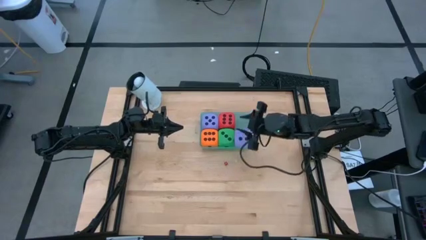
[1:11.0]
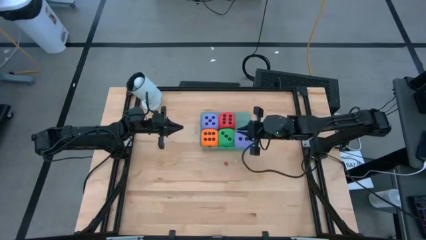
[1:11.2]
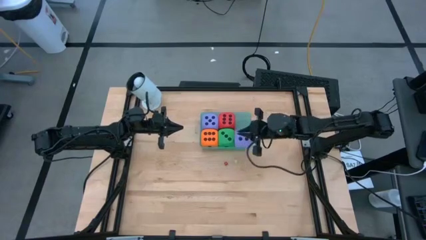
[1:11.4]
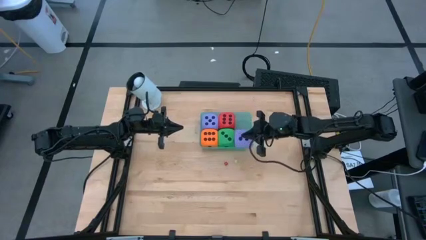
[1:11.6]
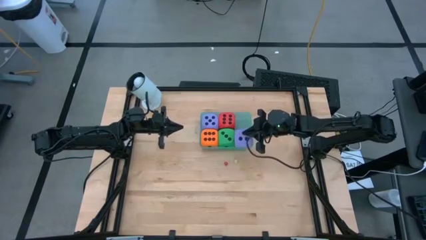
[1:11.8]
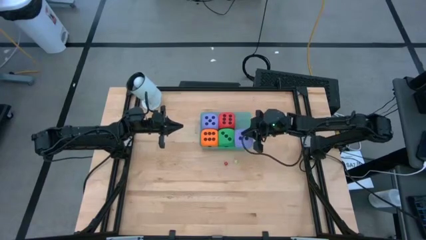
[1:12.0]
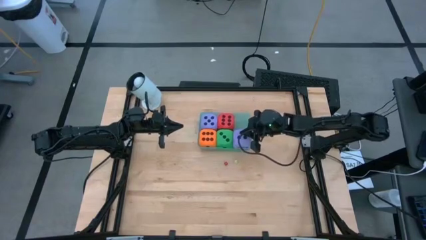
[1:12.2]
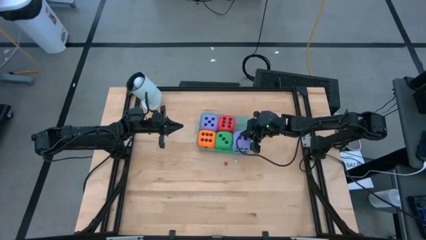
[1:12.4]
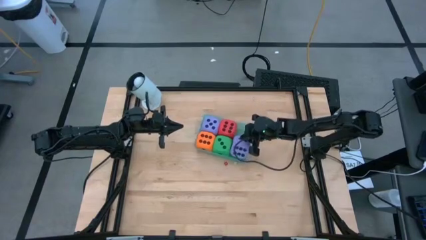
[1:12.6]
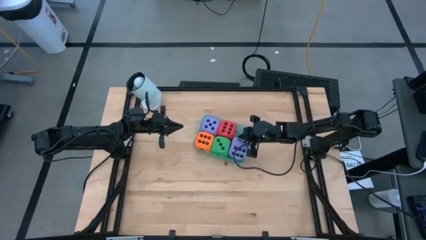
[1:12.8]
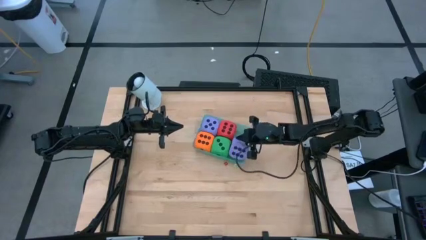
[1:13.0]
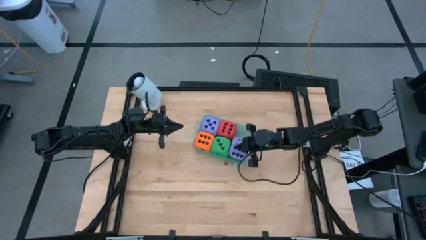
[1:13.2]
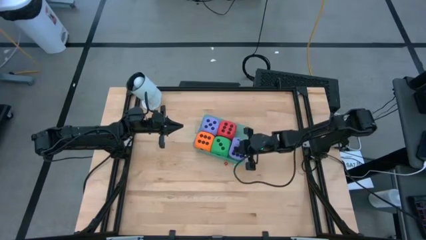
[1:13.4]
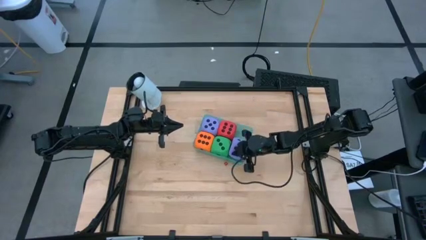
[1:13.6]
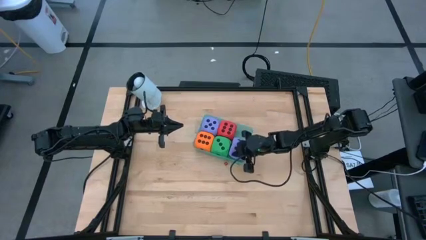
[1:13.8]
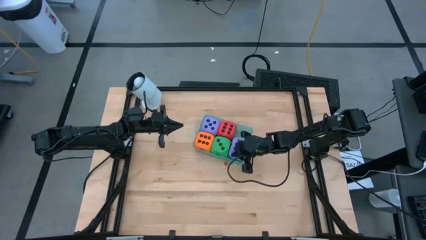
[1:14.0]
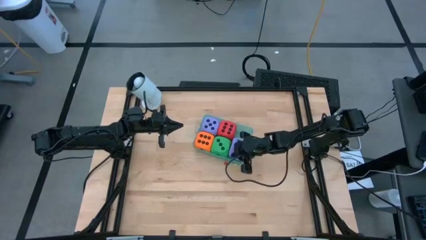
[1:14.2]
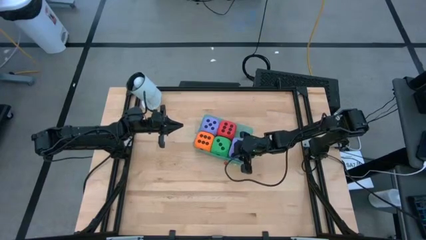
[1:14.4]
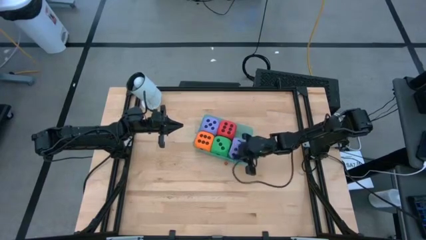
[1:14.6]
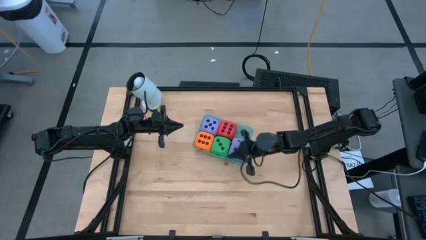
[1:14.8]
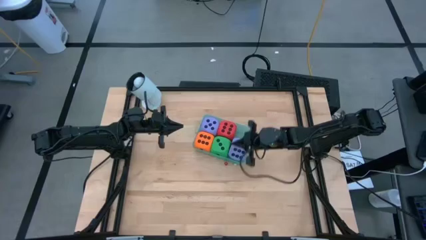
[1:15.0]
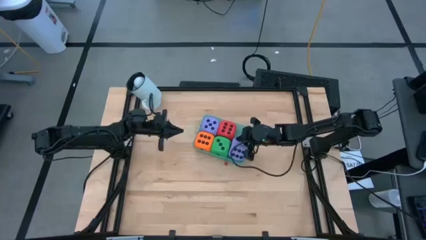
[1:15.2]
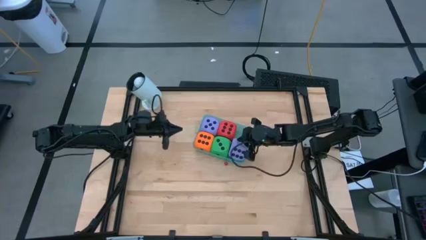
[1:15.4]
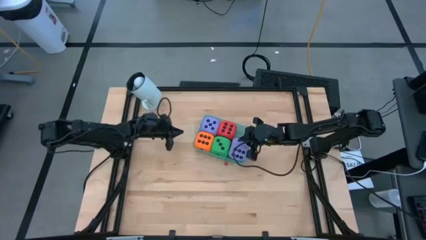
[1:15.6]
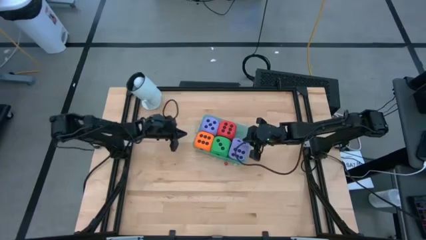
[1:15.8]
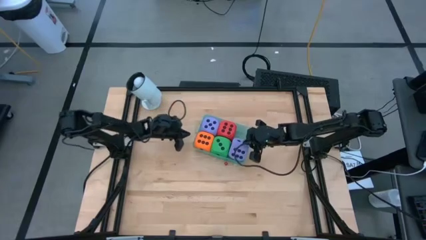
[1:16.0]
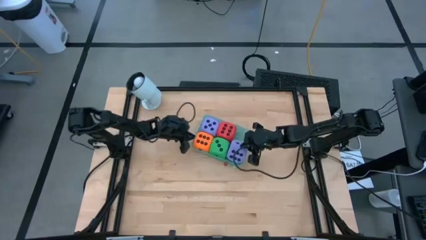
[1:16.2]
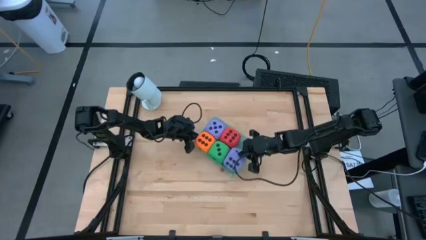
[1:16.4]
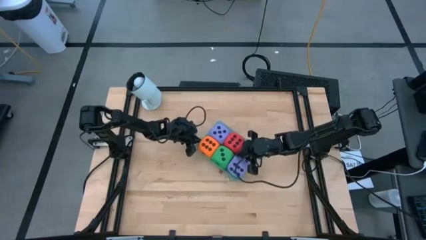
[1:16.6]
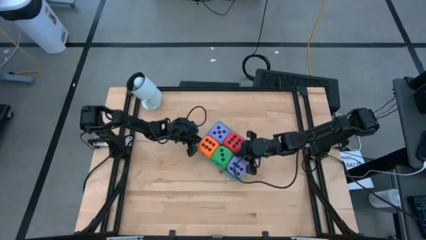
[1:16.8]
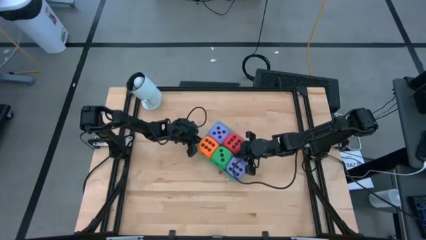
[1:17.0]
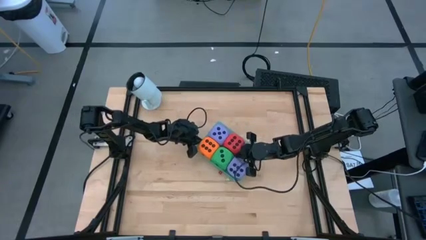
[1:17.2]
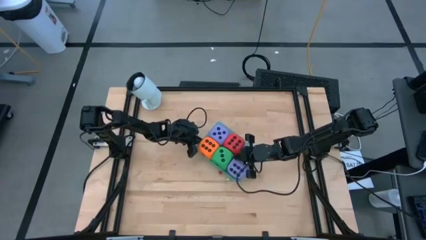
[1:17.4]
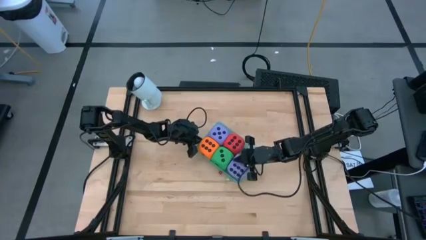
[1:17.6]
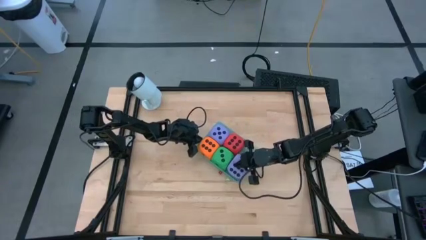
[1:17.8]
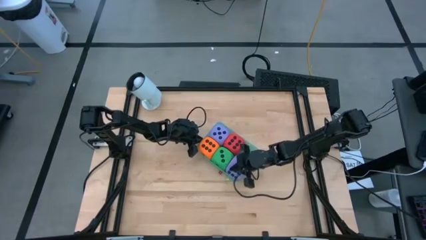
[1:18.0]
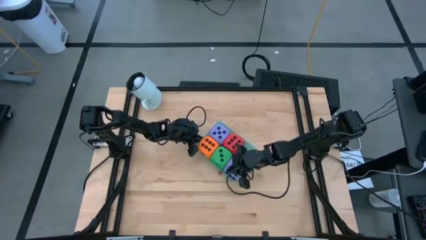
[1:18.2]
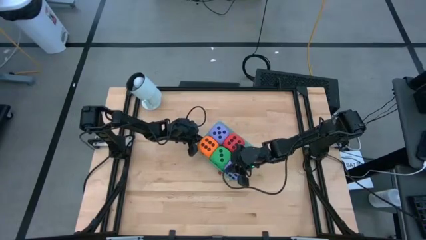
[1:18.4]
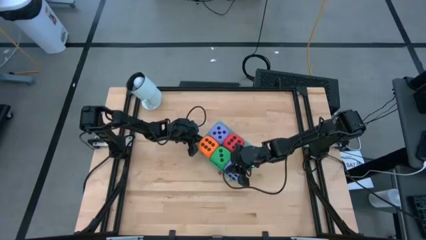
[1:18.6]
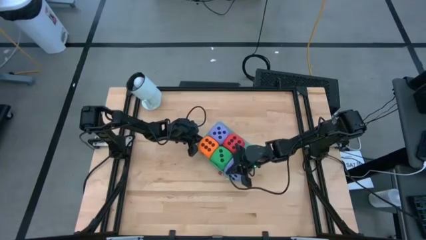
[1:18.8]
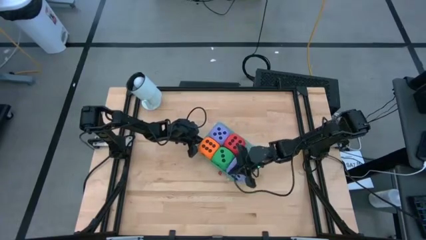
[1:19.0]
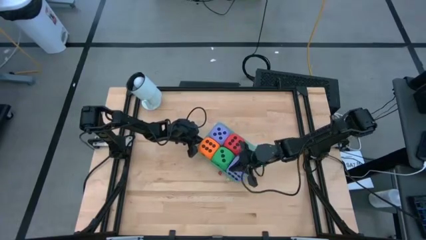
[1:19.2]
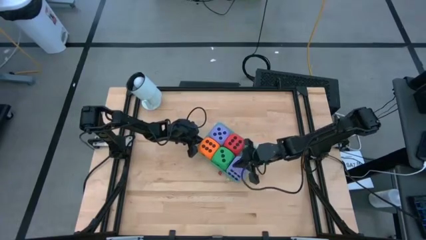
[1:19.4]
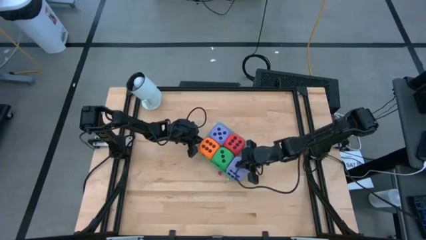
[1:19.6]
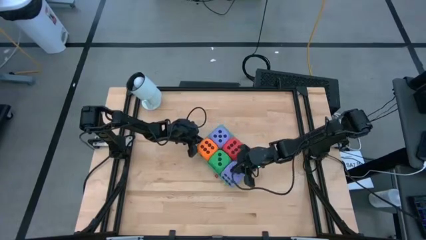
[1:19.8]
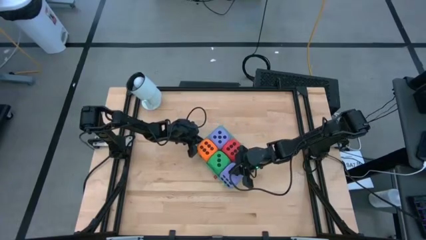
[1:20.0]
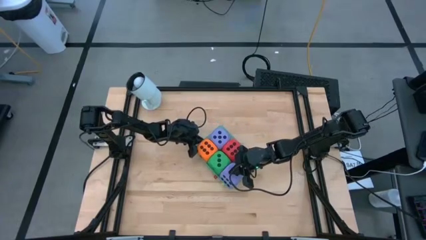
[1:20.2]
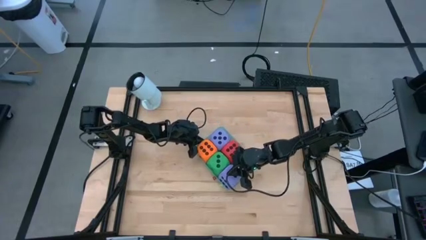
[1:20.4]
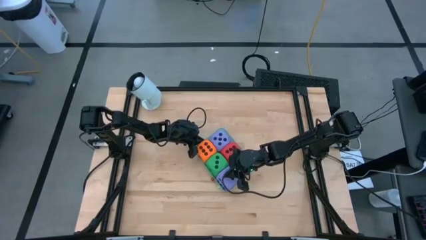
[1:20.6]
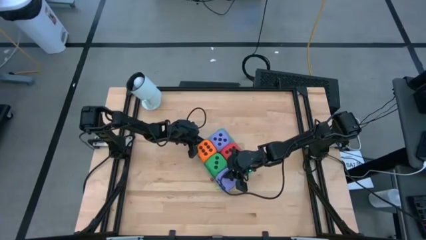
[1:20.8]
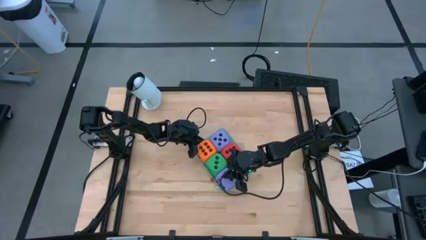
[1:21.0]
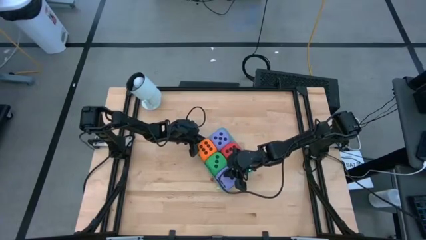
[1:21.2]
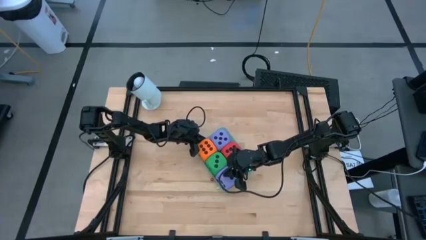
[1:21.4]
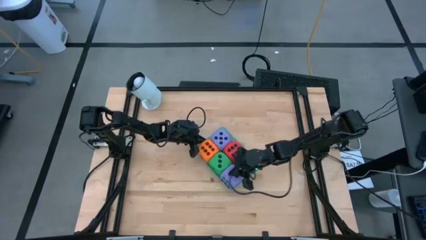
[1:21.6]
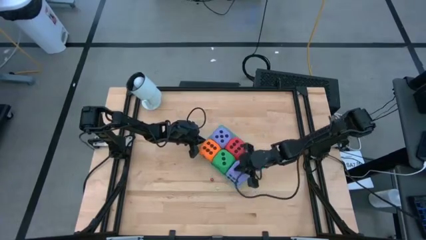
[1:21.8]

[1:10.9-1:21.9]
Task: Pick & Place Dice
Put the big purple die into the green bin

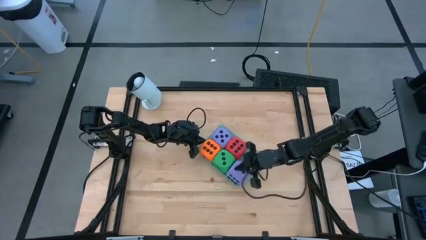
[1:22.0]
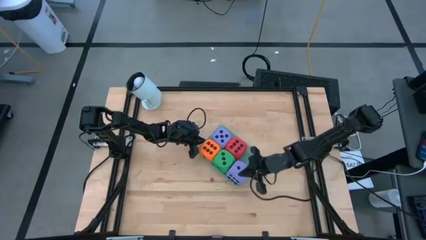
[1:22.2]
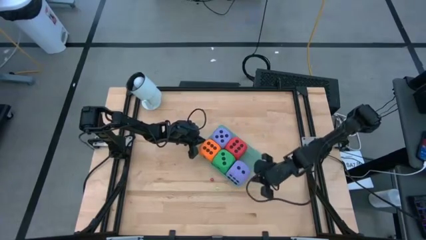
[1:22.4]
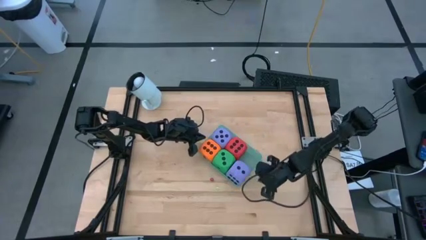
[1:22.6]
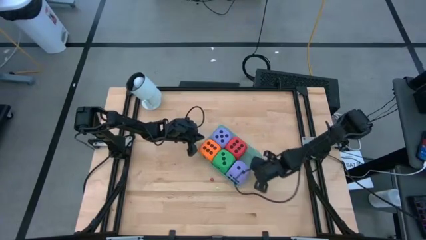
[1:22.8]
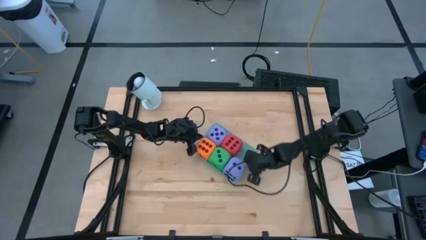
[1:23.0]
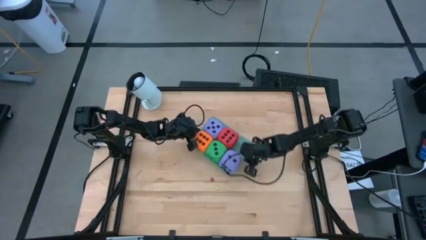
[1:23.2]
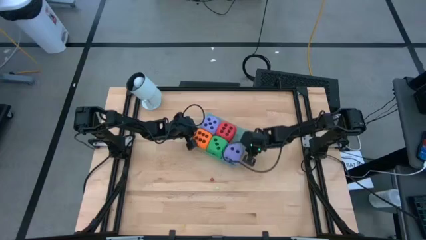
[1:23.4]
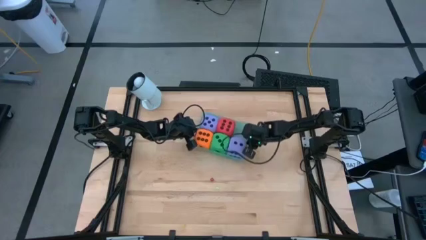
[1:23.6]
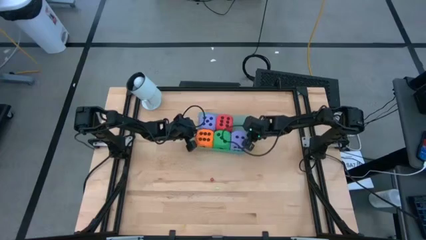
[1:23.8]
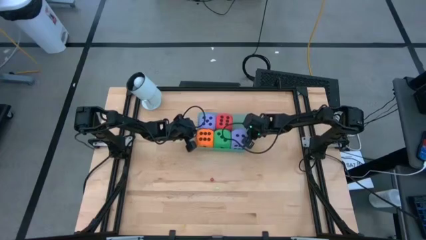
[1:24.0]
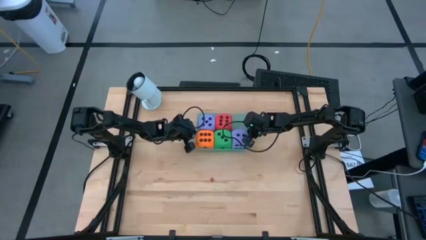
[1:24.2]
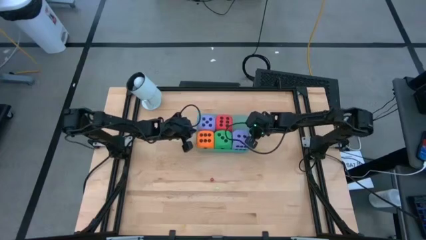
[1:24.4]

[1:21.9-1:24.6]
Adjust the green bin

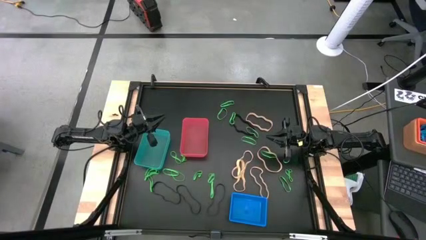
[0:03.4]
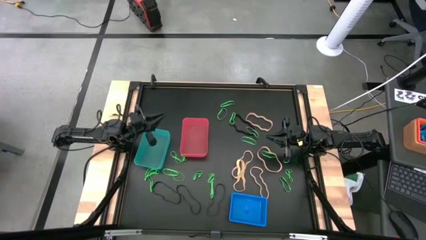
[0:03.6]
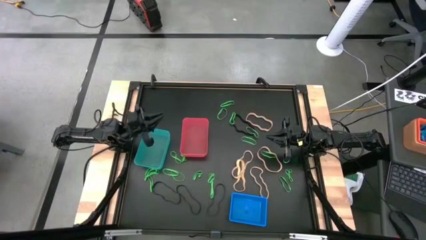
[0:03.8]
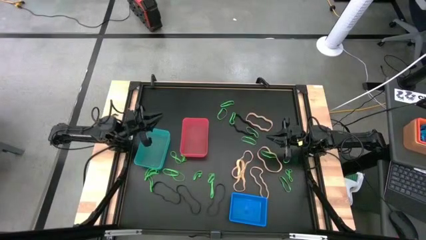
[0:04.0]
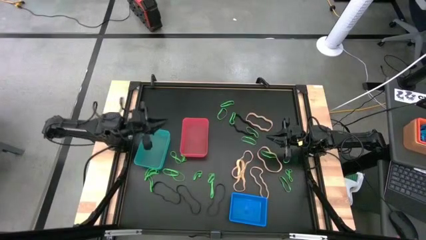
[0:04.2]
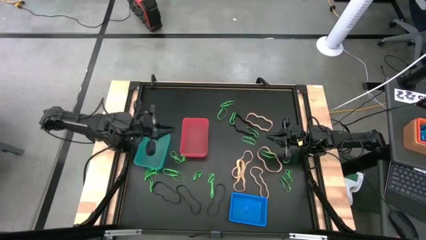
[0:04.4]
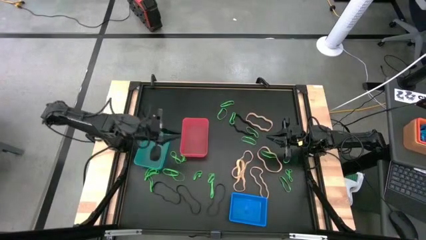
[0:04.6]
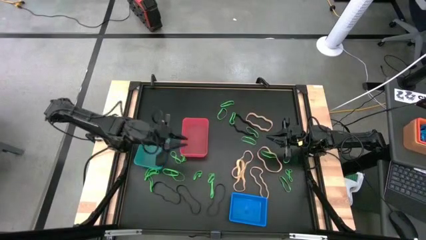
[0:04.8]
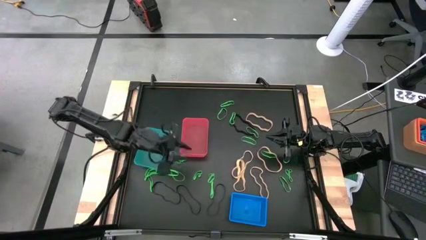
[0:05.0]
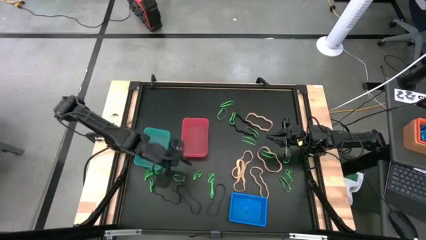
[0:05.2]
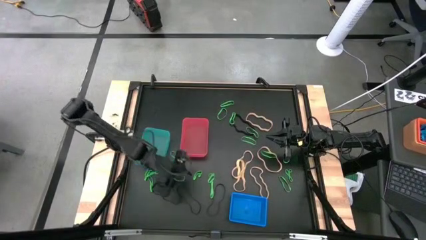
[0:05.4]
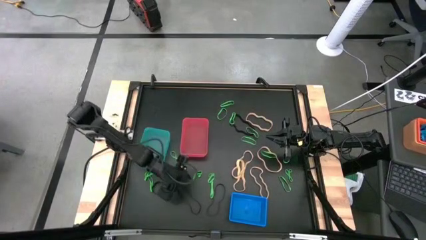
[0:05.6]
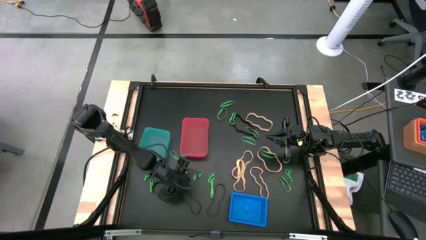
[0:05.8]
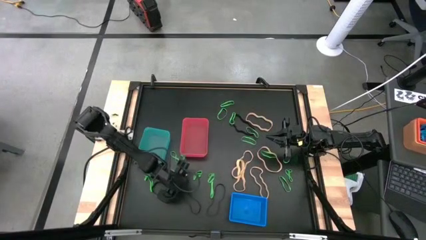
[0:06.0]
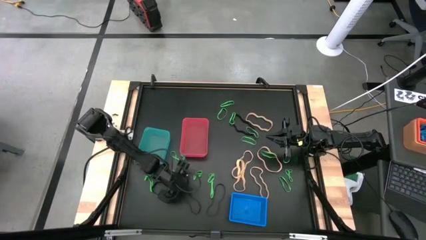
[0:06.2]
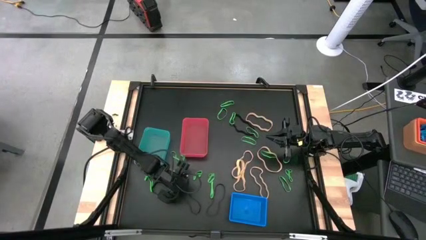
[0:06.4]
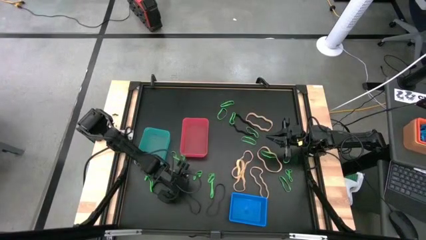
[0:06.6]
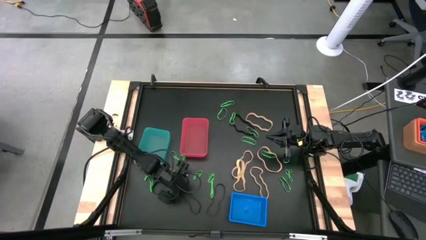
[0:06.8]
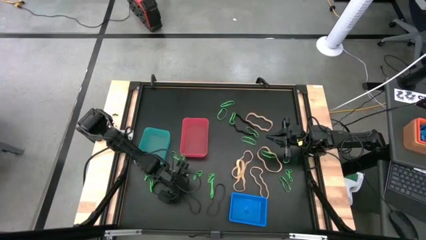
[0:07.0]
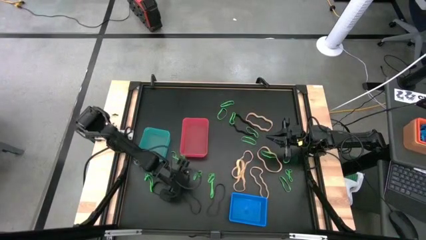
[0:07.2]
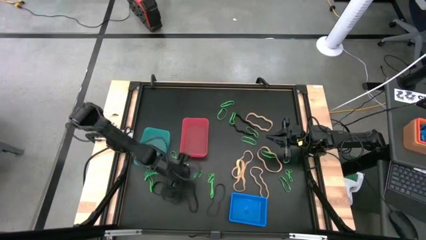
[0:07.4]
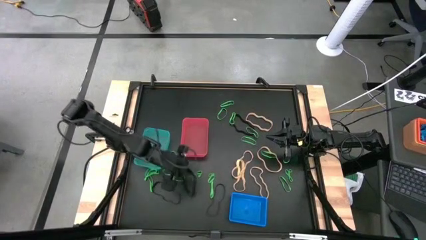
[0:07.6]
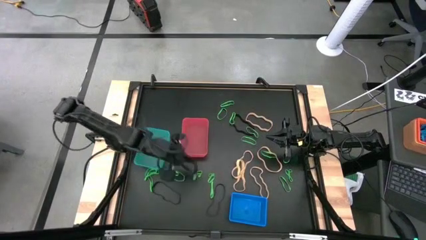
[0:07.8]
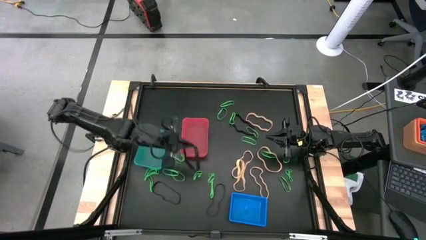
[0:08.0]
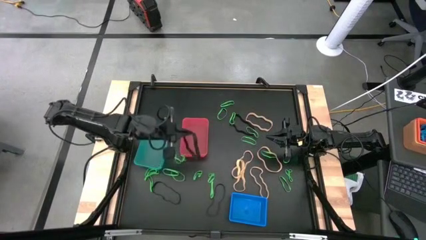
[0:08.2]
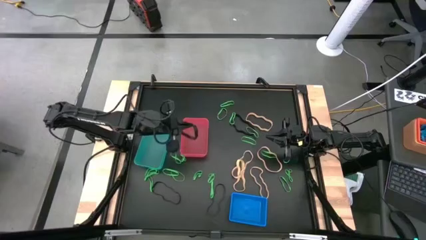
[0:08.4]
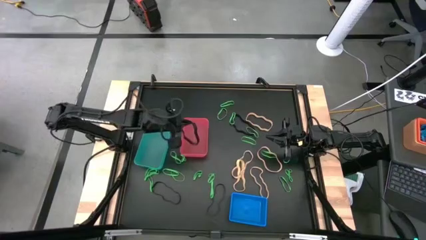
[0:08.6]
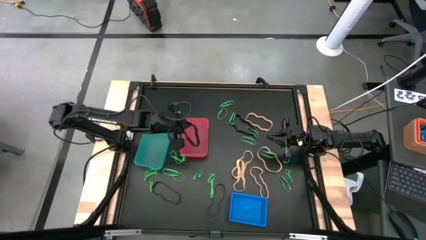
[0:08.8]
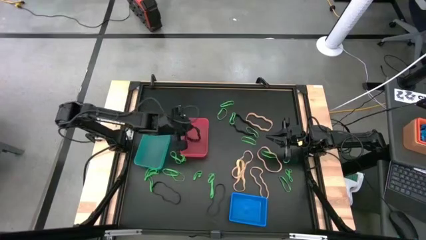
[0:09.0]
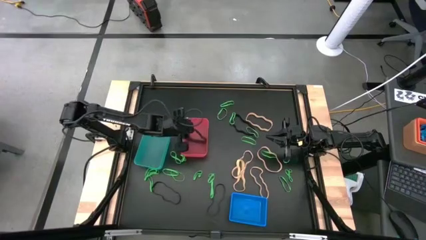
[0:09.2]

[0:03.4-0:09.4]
Task: Sort rubber bands into baskets
Put the black rubber band into the pink bin
